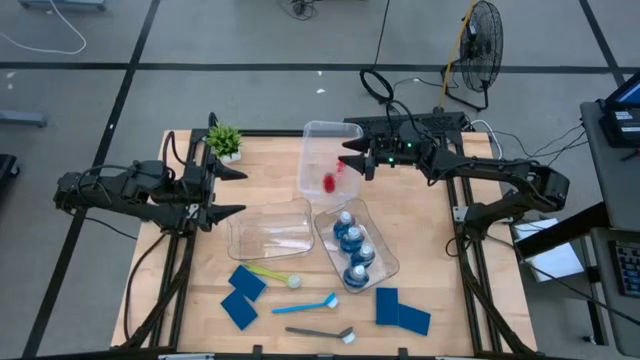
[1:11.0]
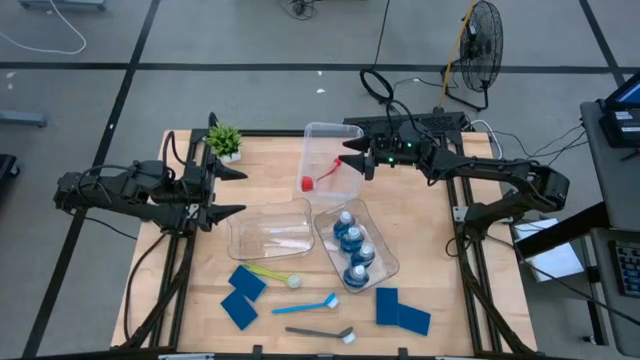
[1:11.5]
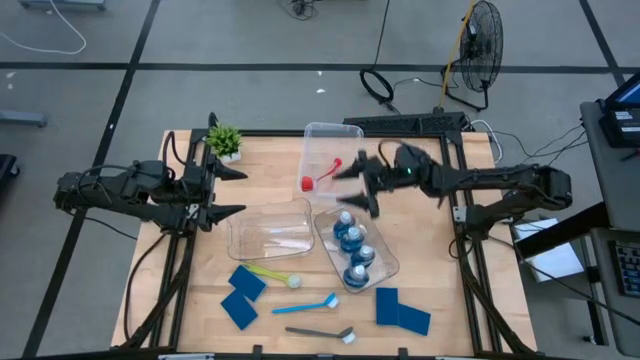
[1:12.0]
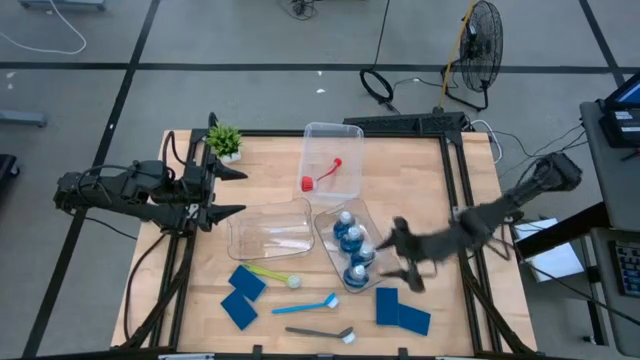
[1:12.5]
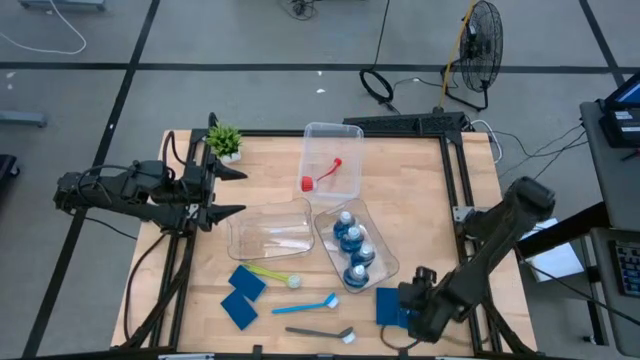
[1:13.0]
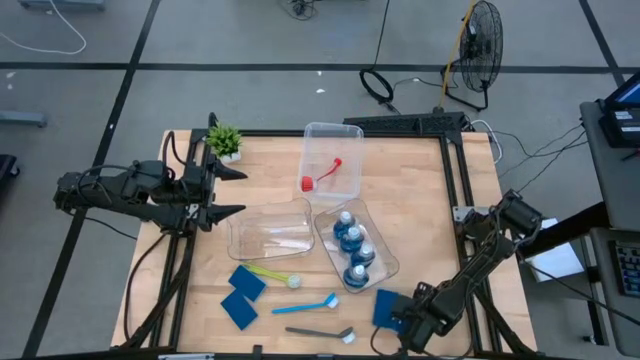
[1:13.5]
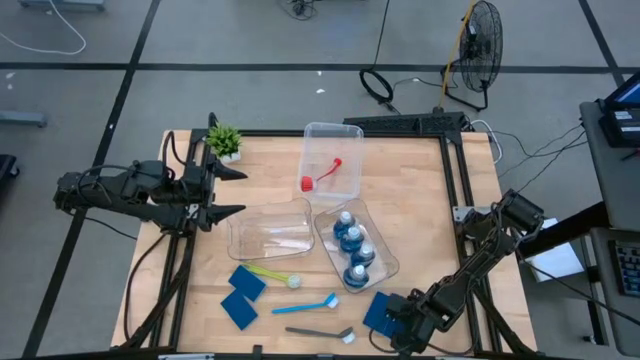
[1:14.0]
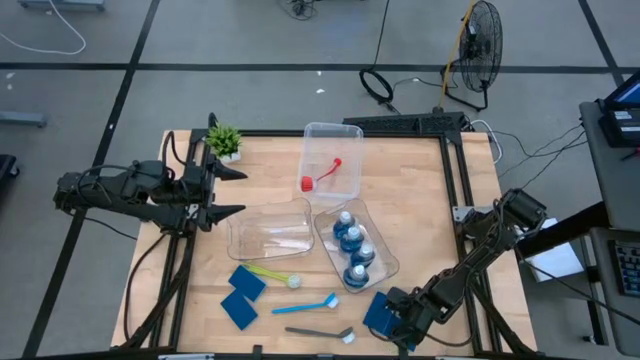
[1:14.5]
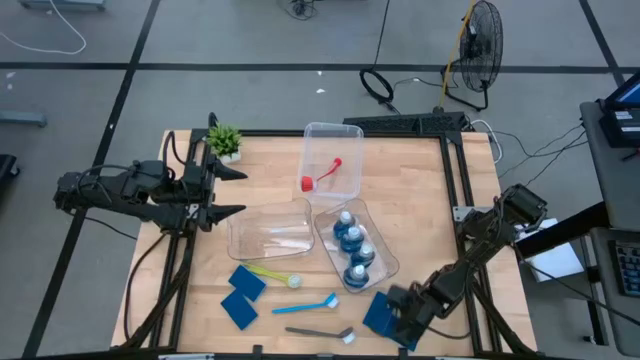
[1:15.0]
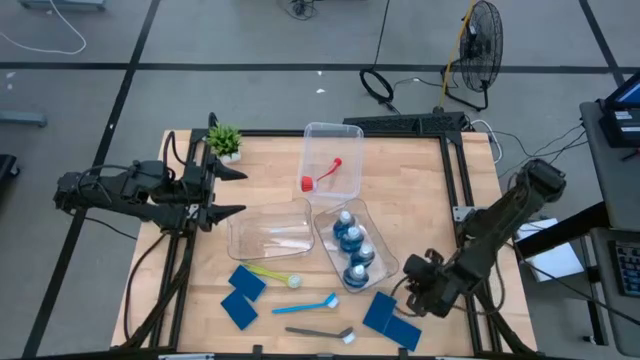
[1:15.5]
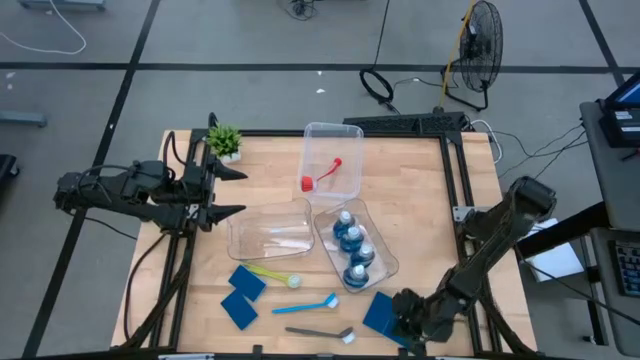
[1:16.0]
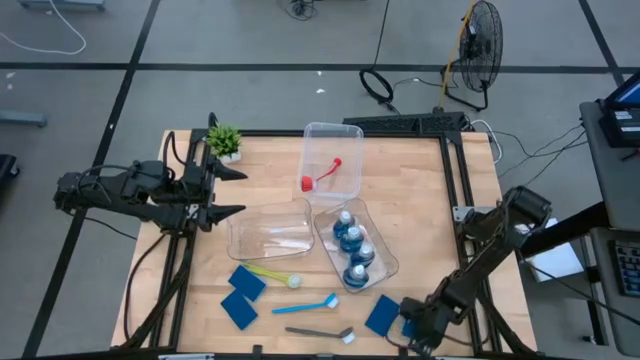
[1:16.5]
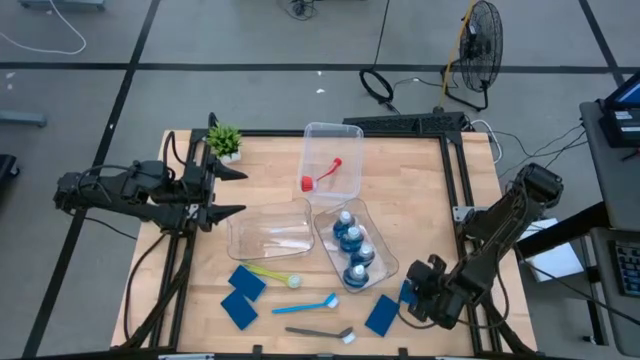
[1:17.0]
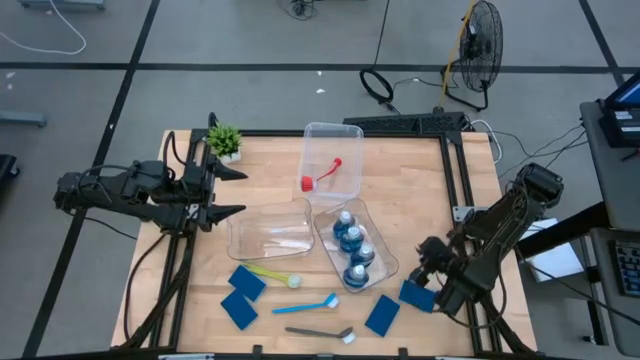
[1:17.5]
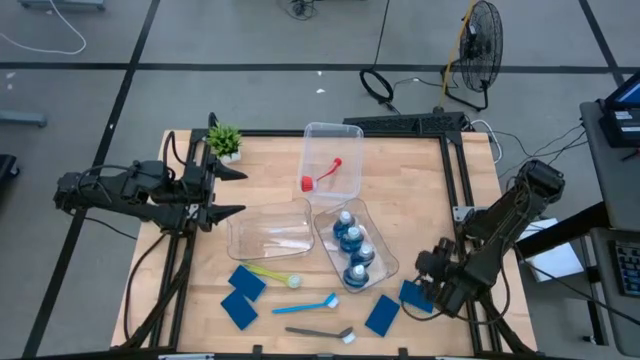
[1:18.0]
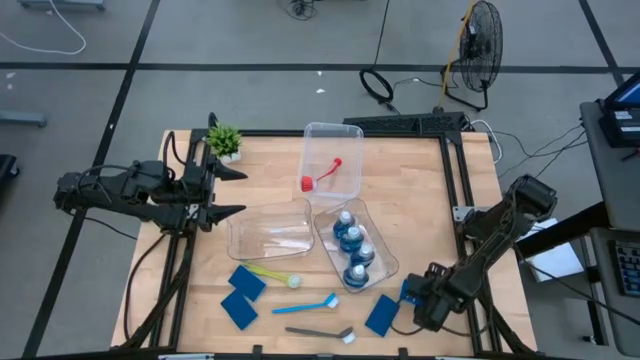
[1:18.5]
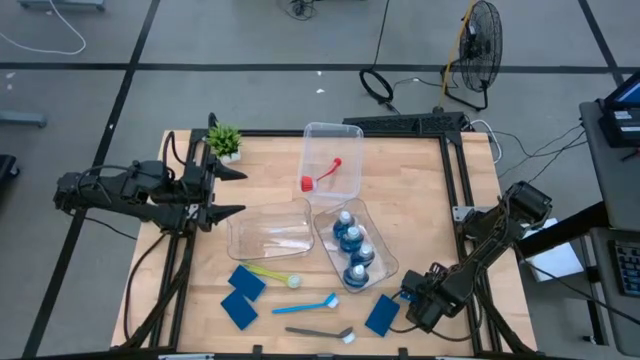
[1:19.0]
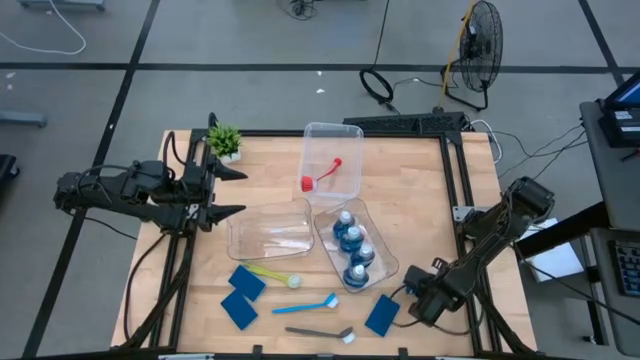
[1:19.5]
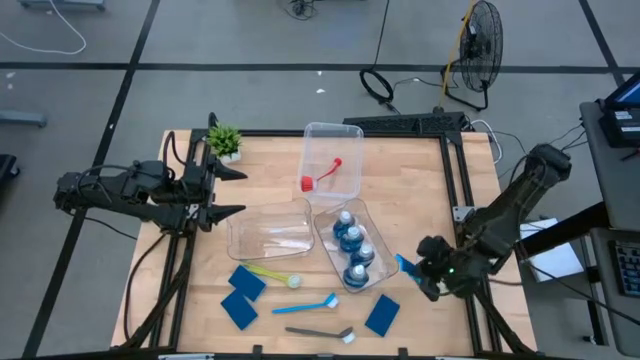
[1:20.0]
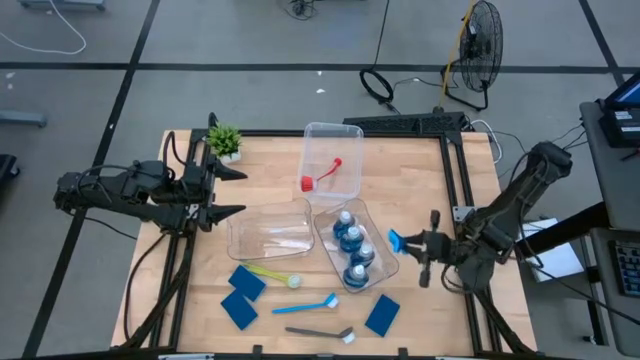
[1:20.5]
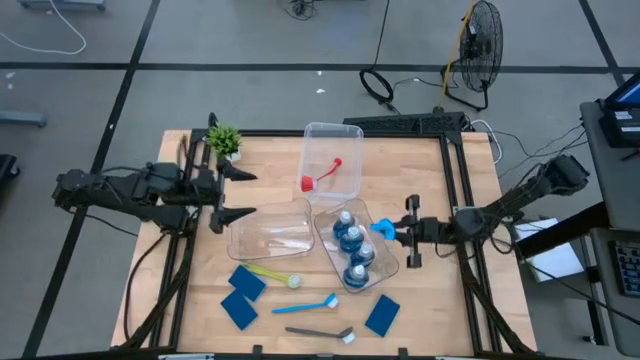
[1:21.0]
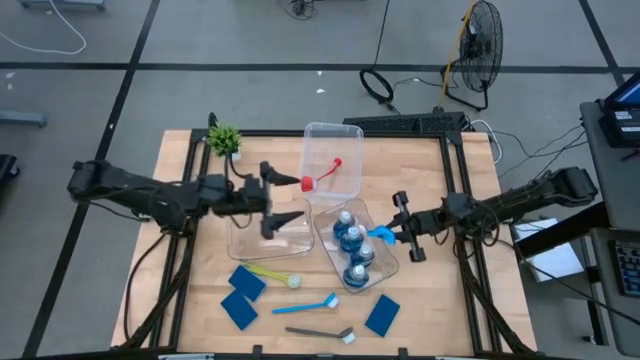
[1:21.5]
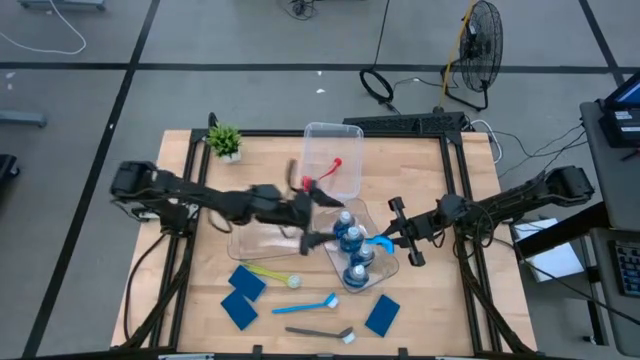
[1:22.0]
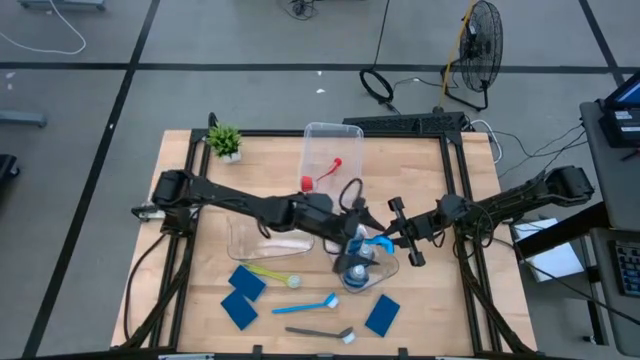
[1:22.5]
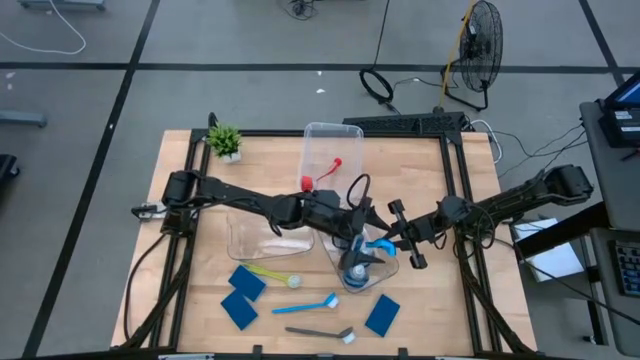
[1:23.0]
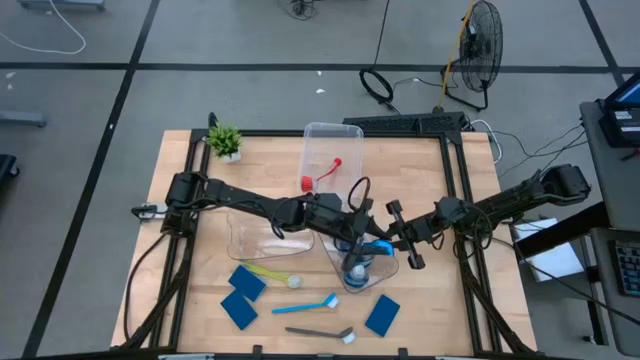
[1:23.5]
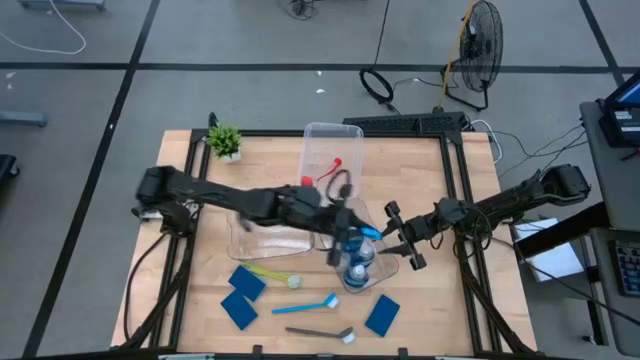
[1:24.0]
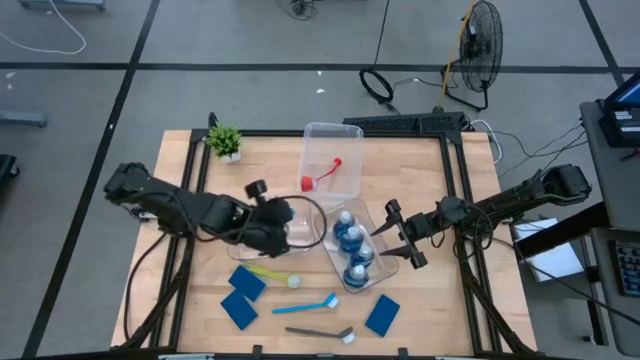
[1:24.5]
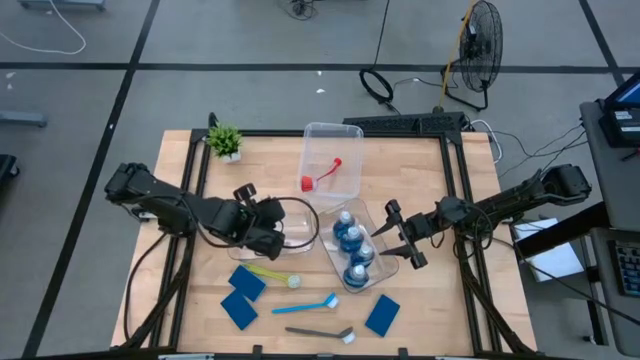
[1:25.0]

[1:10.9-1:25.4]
Task: Pick & Place Kitchen Sink Supplies
Put the blue sponge into the left transparent bin

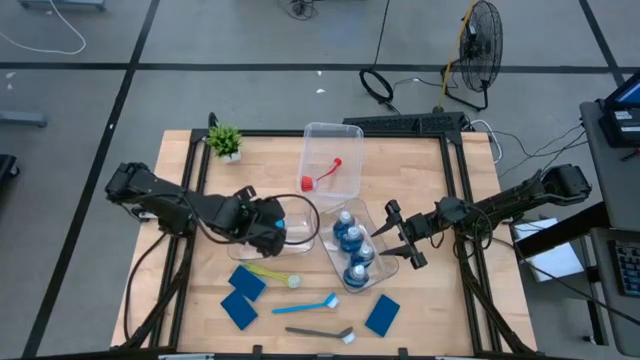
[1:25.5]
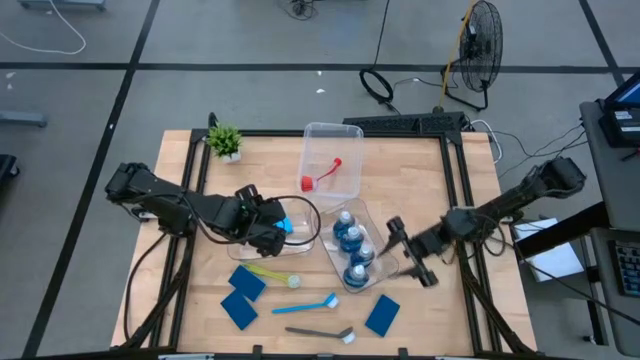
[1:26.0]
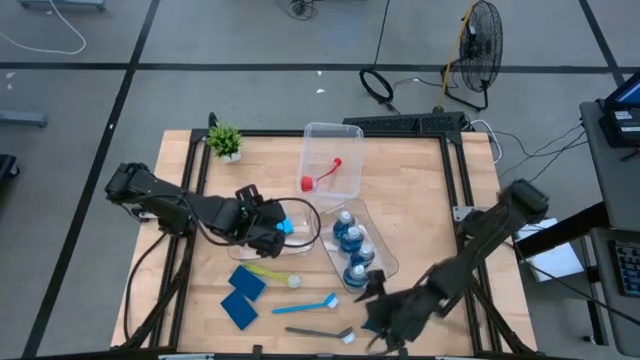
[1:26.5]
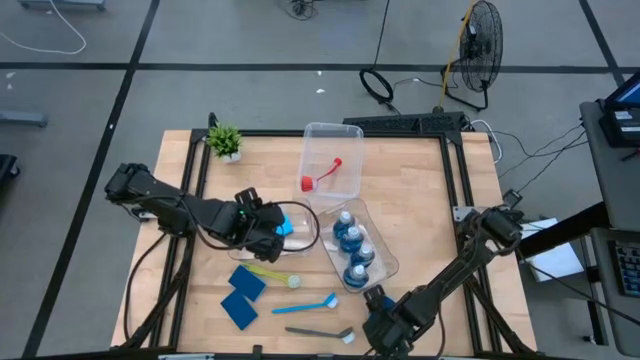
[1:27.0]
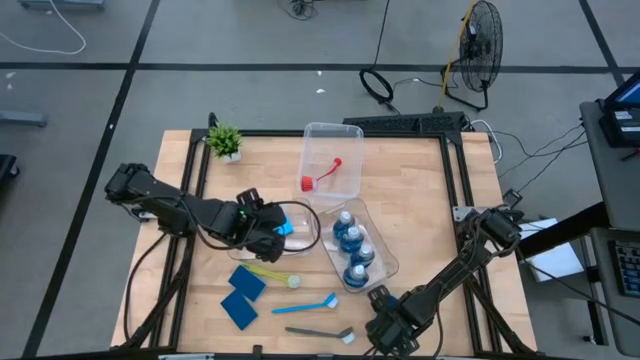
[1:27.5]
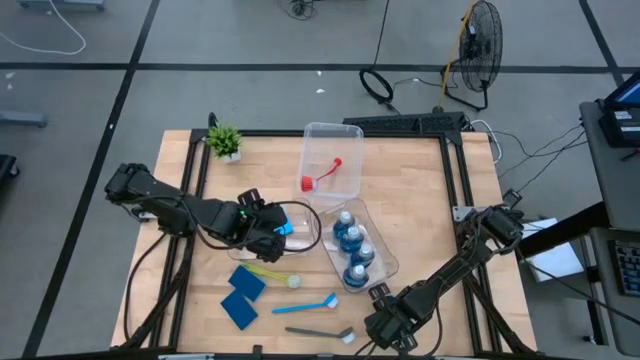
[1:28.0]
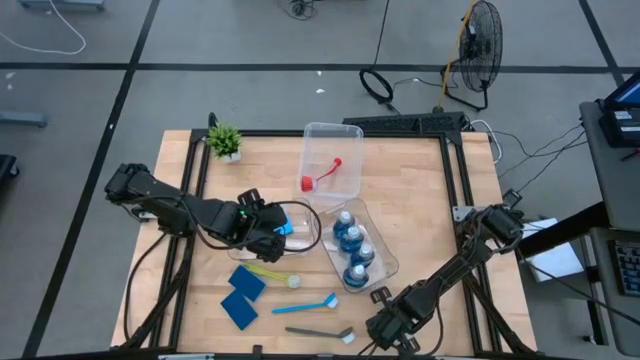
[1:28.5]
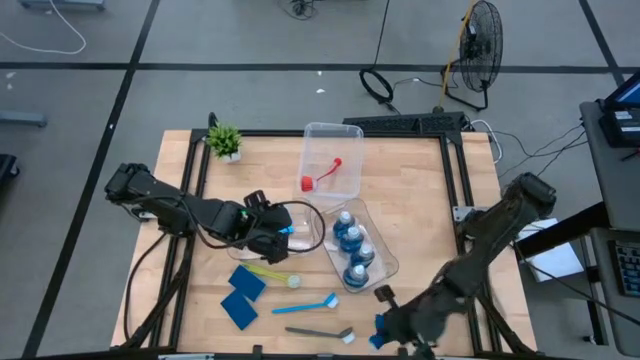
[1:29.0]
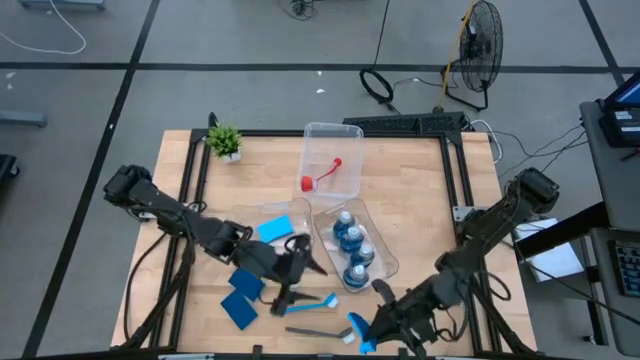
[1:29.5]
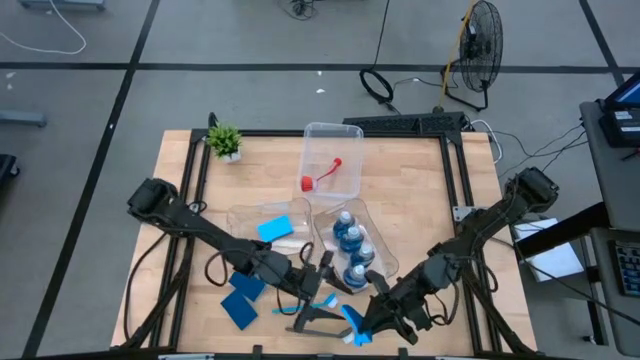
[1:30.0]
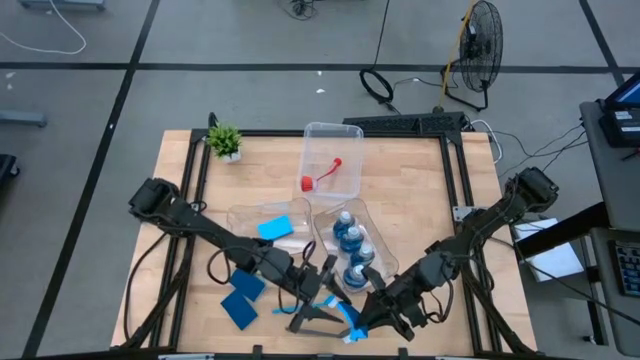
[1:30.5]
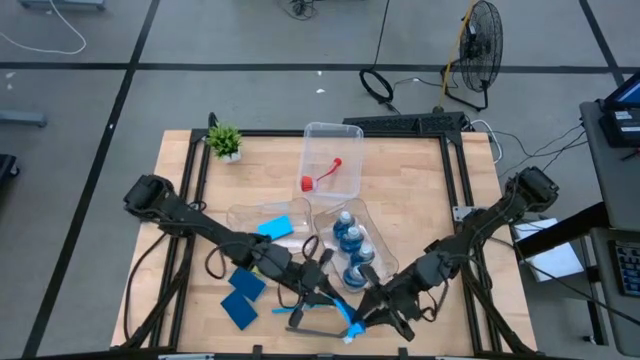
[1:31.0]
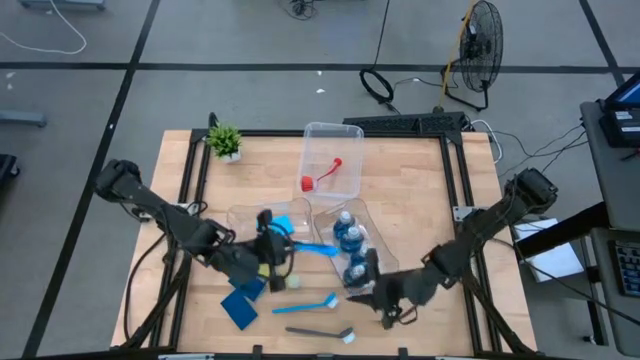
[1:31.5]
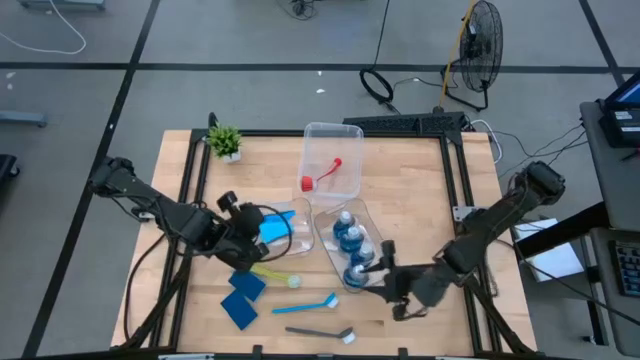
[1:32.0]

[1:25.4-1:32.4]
Put the blue sponge into the left transparent bin
